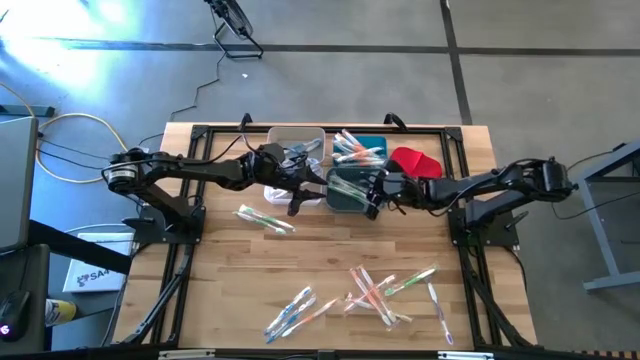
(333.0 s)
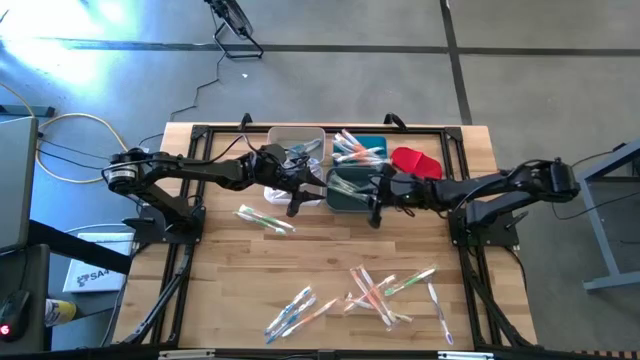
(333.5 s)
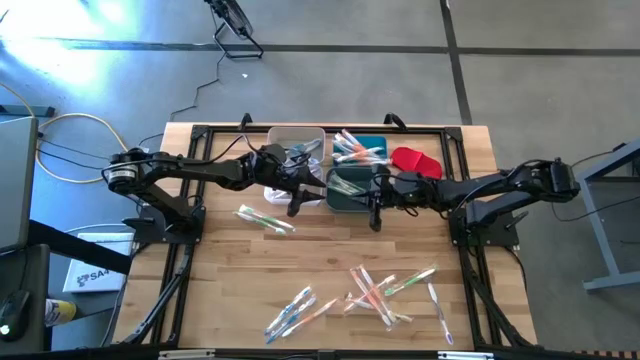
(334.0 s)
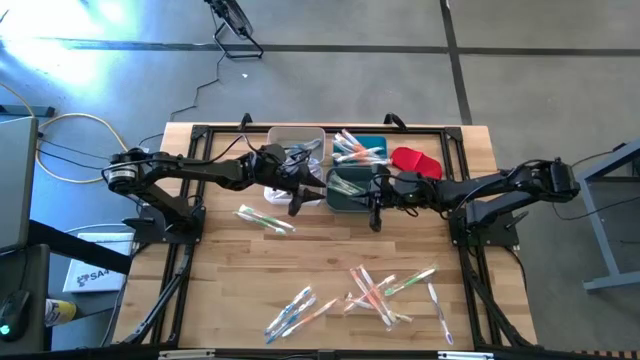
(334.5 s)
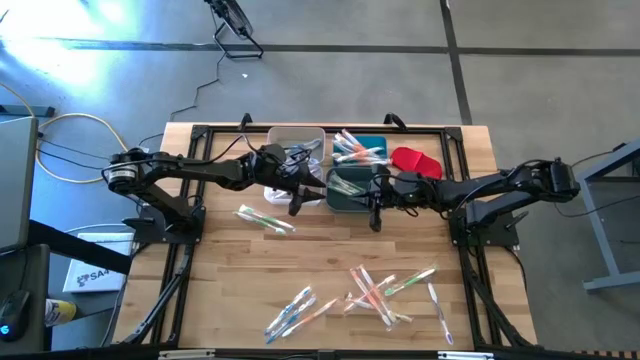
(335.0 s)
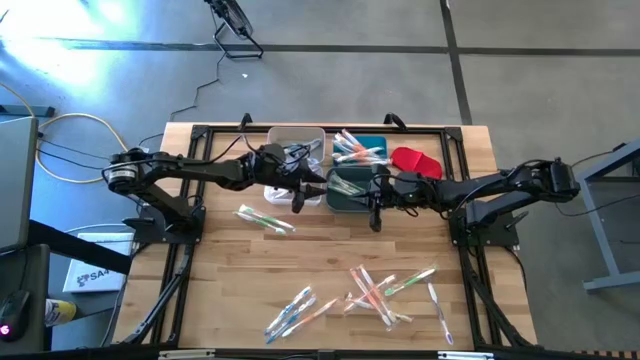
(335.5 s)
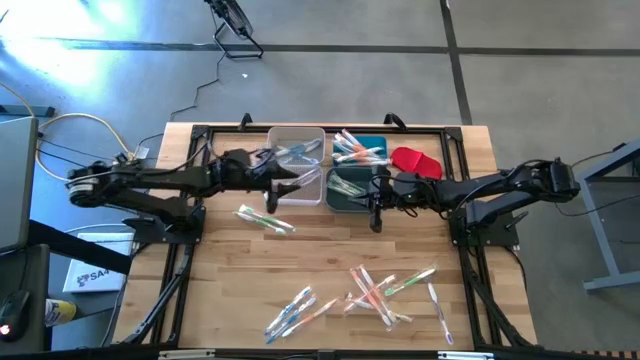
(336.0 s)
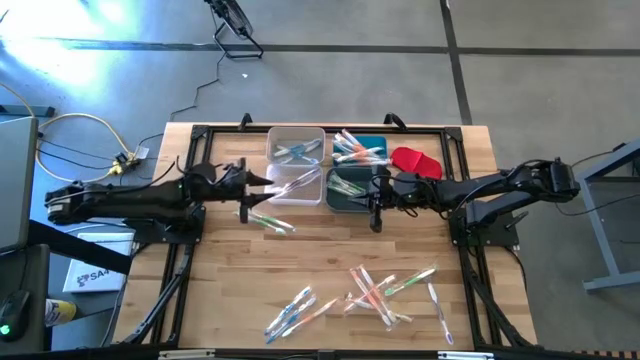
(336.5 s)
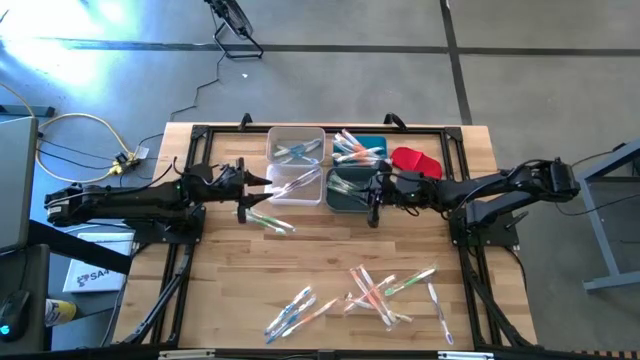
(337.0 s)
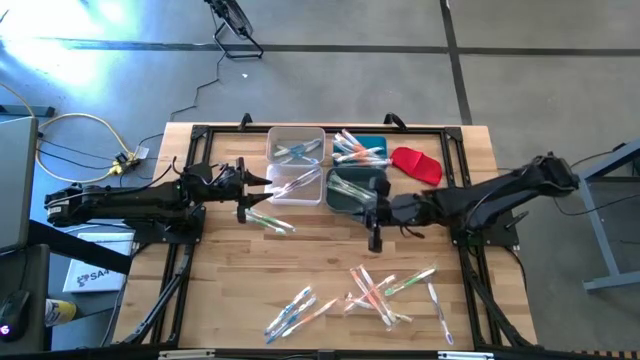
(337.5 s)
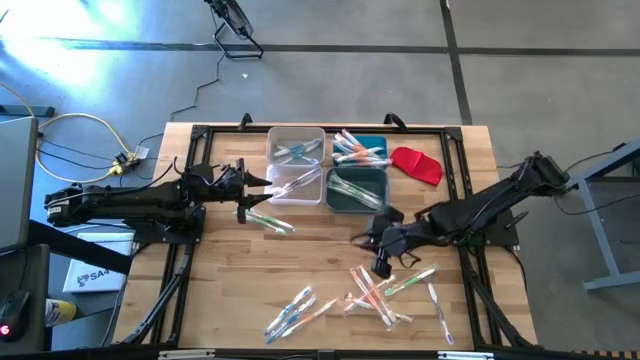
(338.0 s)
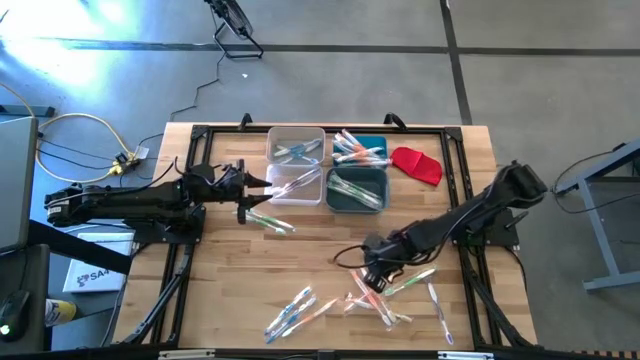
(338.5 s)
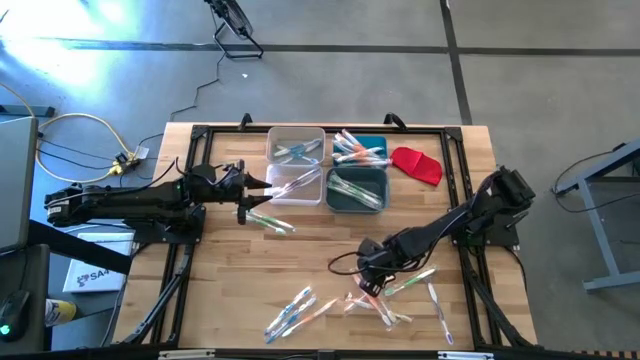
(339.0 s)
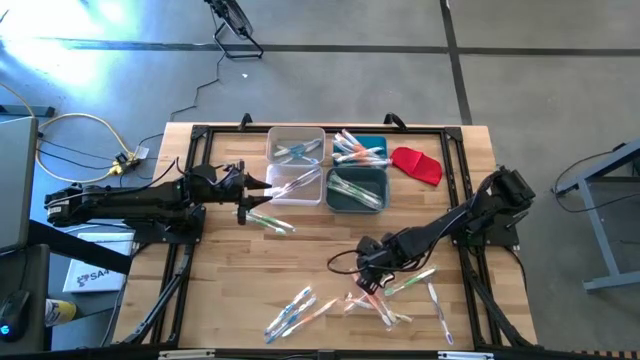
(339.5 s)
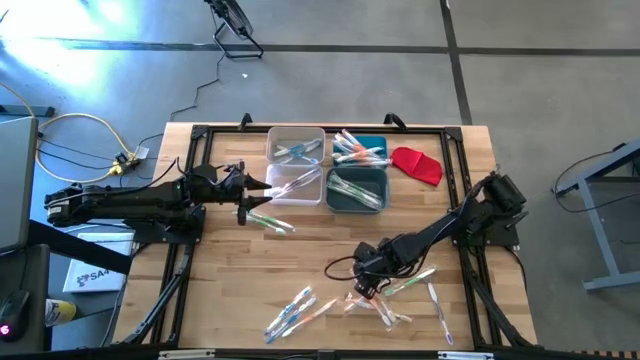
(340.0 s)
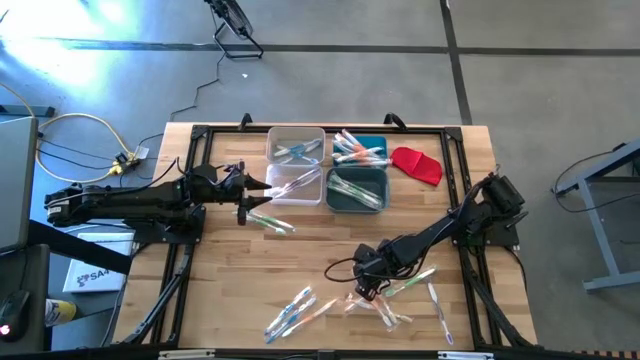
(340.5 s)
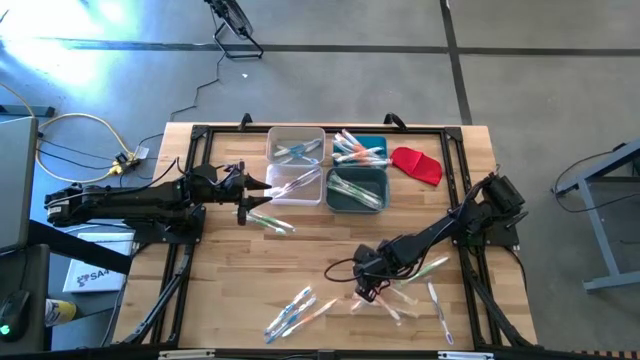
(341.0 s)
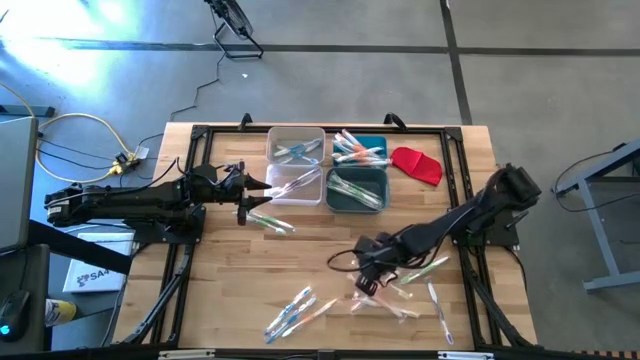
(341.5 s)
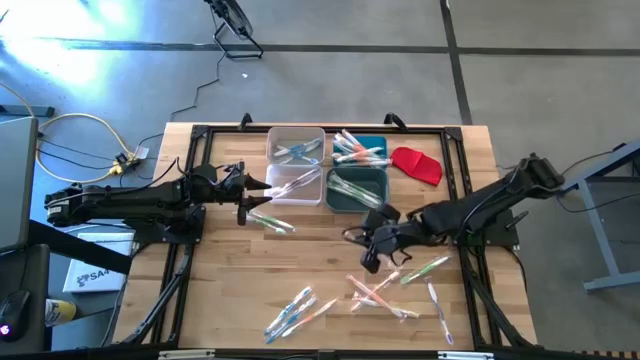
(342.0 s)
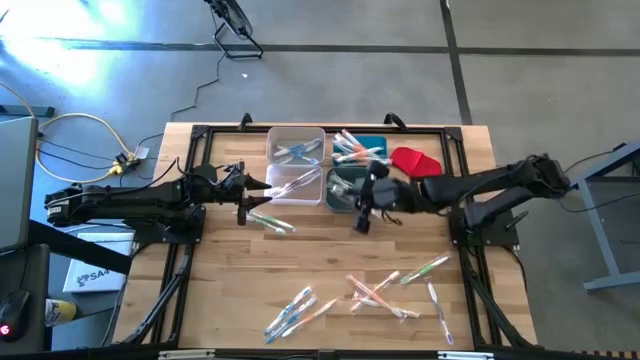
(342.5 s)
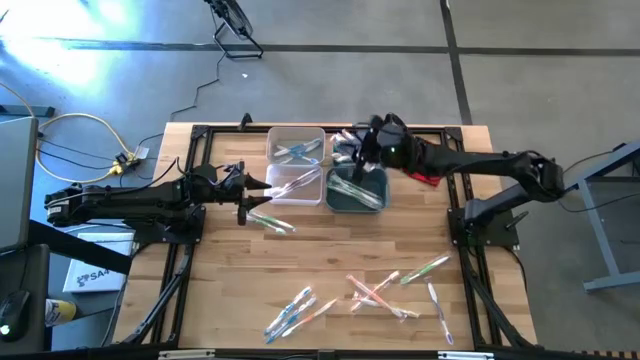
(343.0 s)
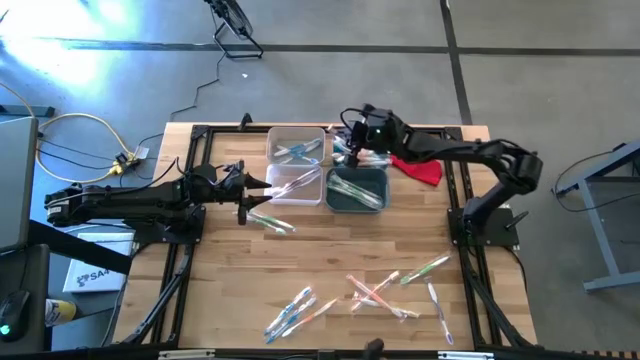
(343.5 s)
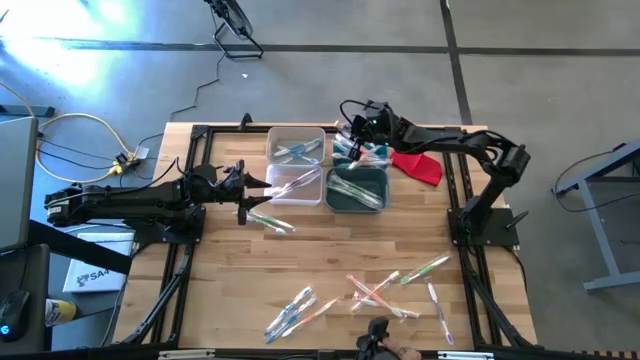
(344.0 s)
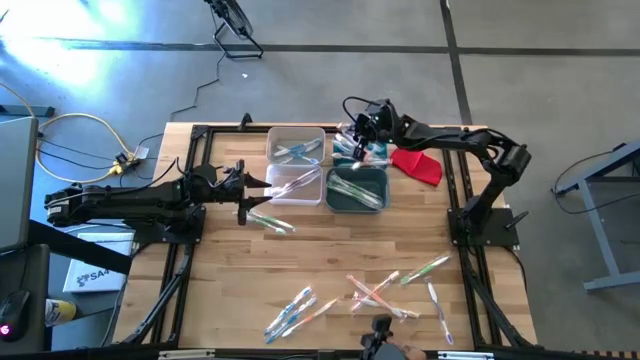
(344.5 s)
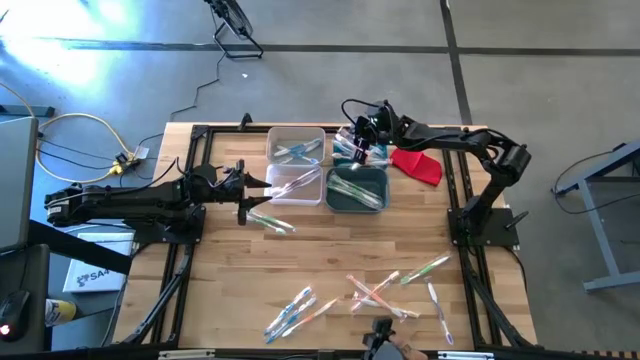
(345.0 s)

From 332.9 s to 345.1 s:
Task: Pick & Place Toothbrushes
Put the orange toothbrush into the blue bin

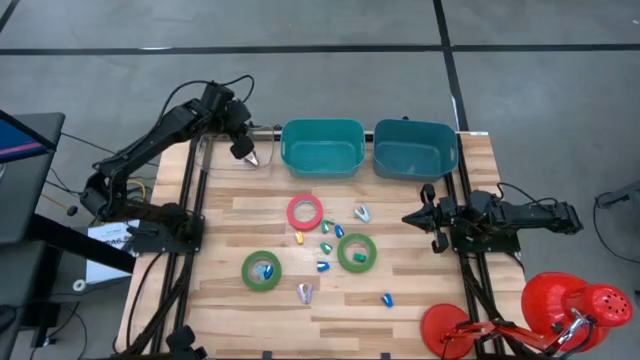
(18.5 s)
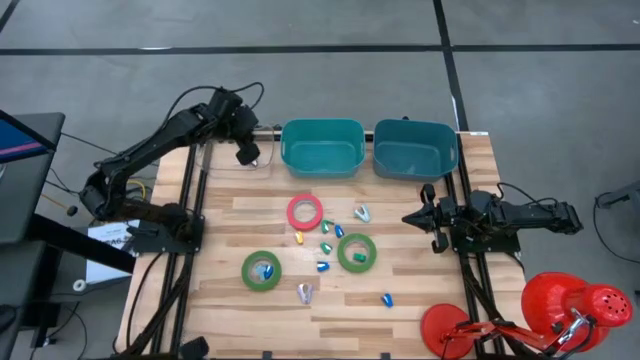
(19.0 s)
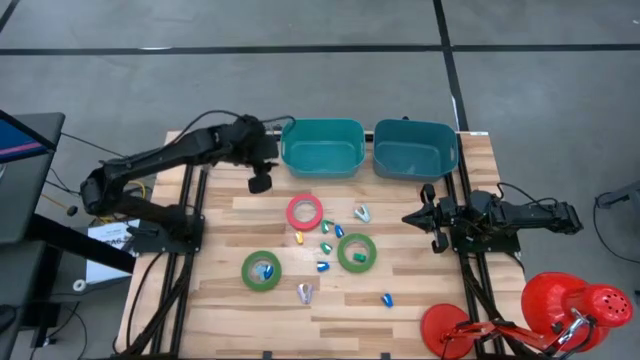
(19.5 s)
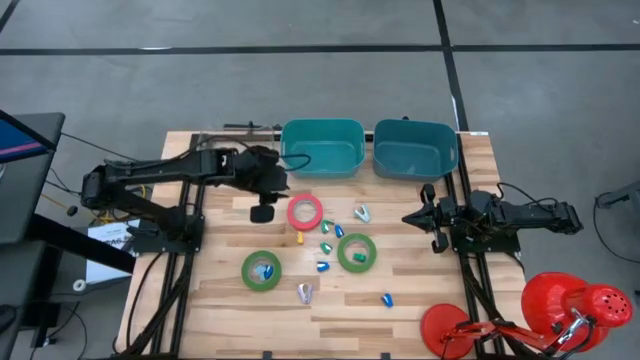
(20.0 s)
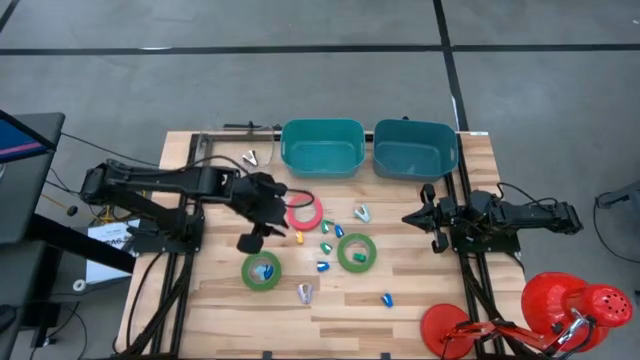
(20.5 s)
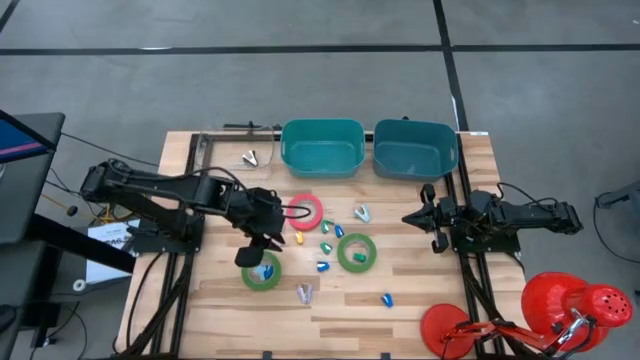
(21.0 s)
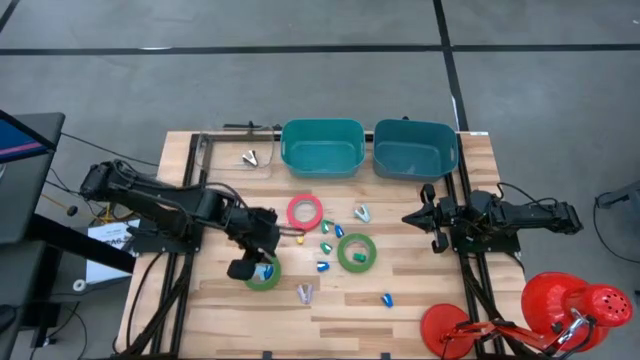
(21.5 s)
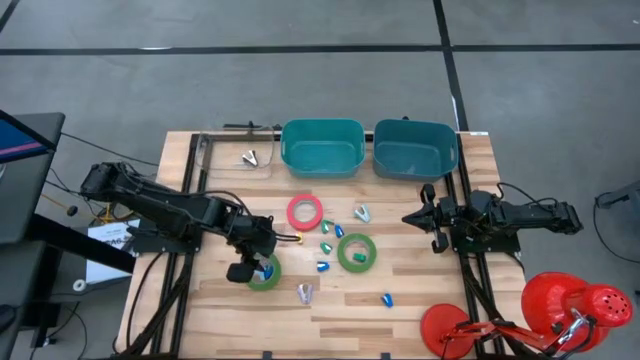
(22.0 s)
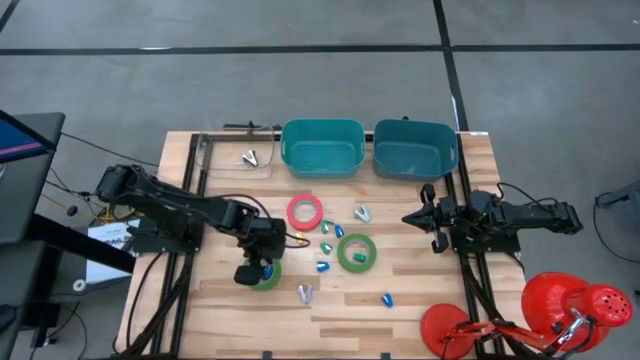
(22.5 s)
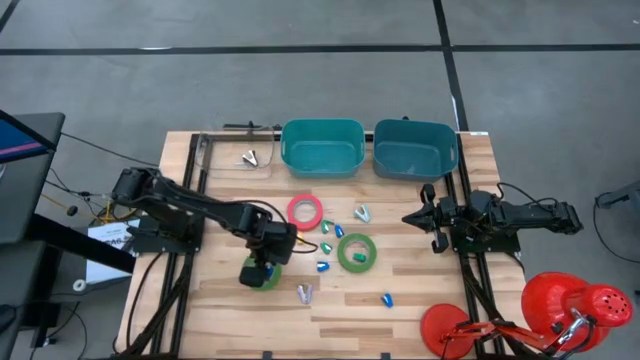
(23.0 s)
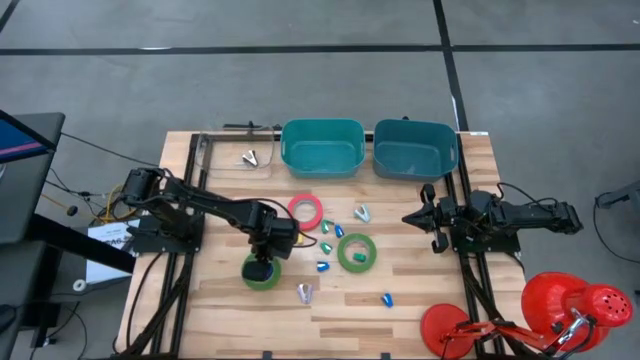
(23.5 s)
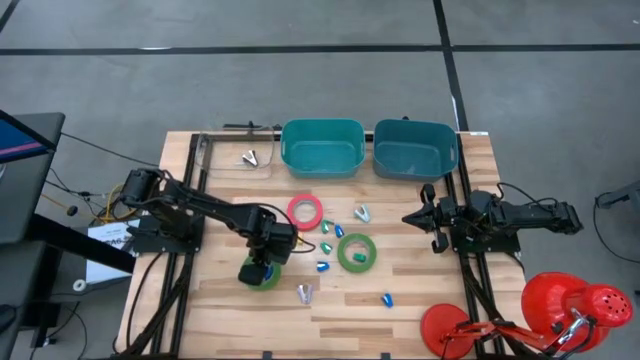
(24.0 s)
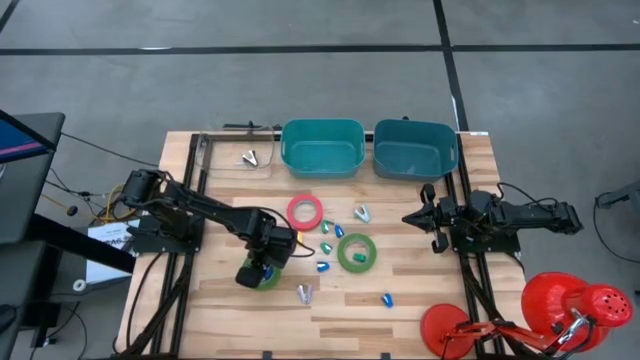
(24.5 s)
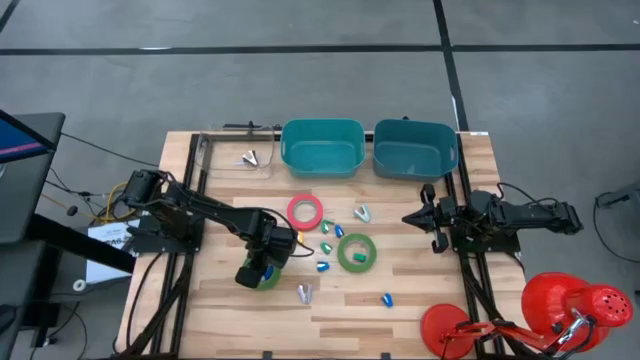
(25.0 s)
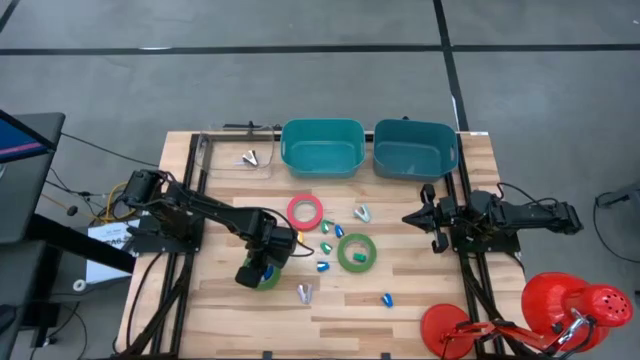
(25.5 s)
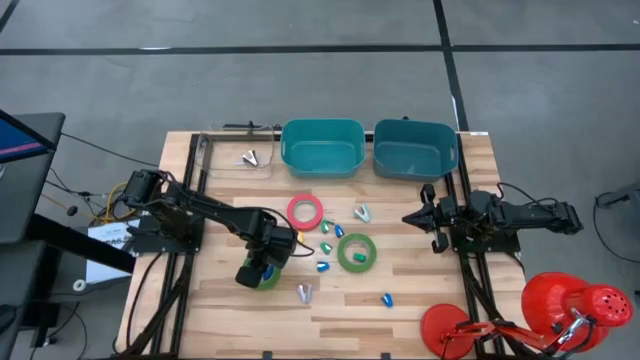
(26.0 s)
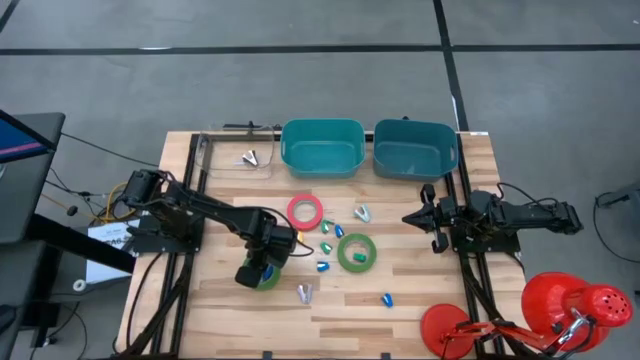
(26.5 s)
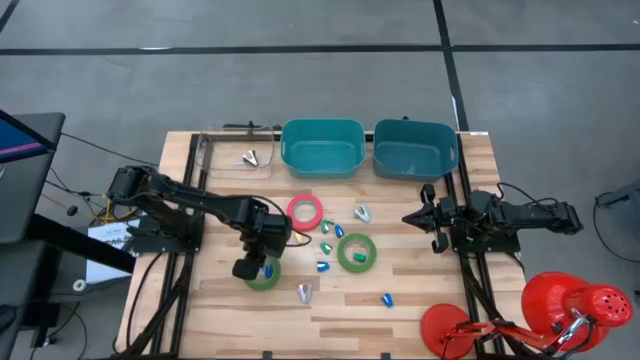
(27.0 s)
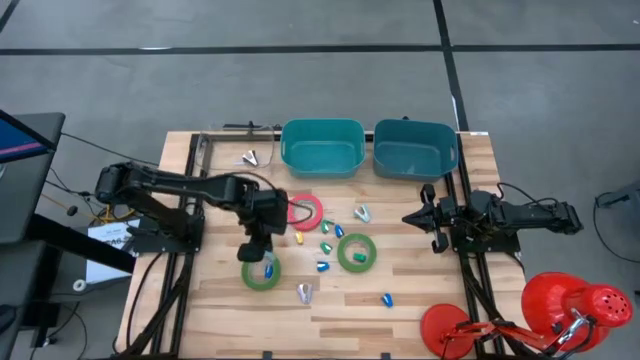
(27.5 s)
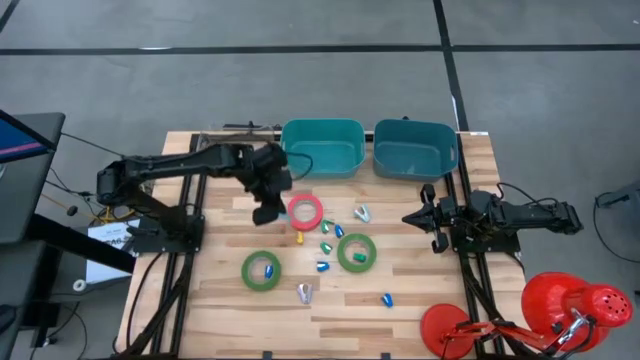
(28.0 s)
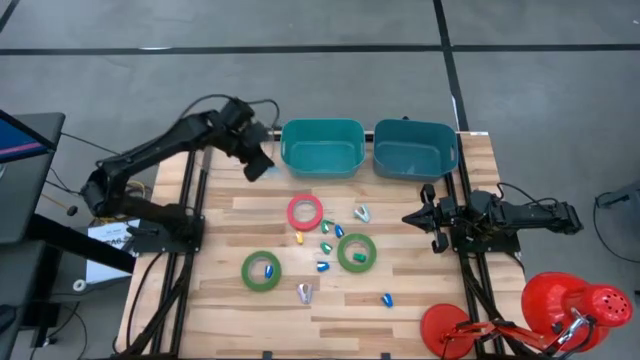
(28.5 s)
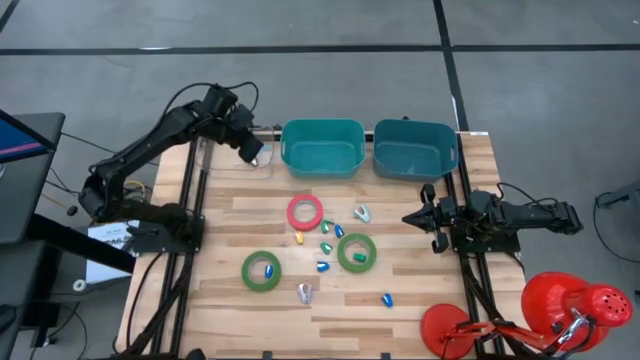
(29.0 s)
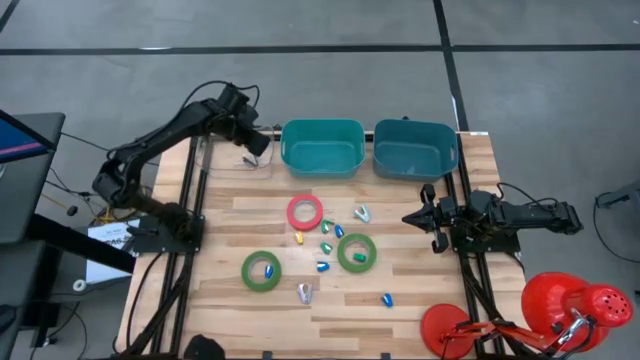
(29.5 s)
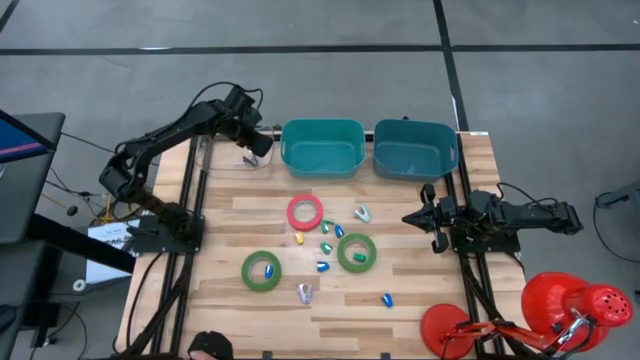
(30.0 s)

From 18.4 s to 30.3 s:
Task: Pick and place Stapler, Stapler remover, tape
Put the light blue staple remover into the transparent bin
